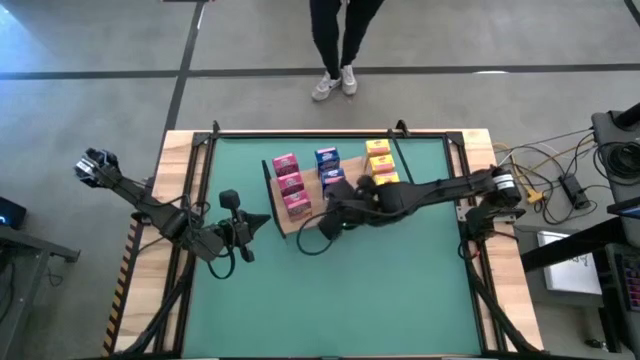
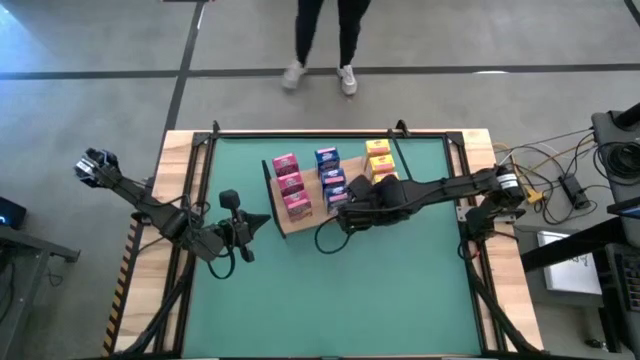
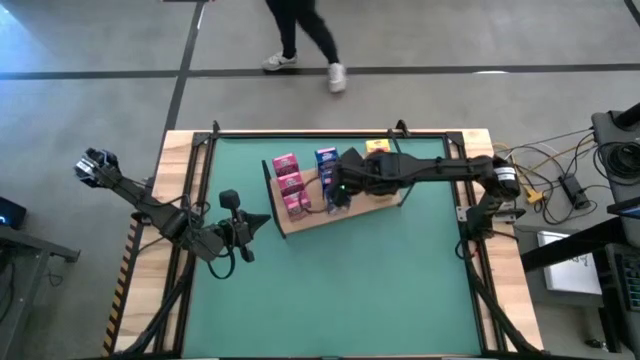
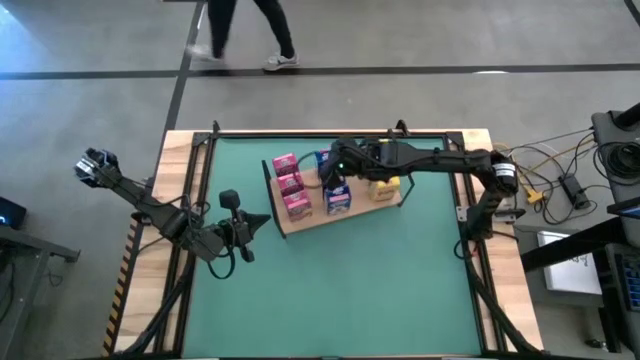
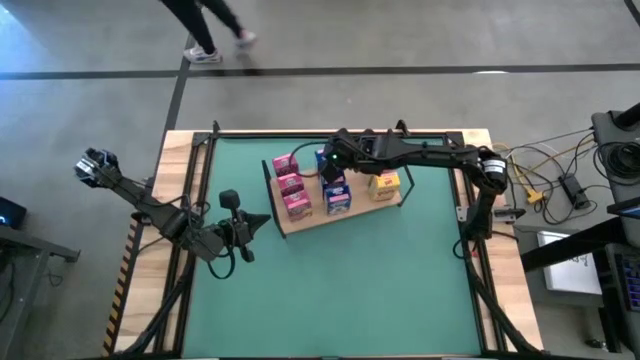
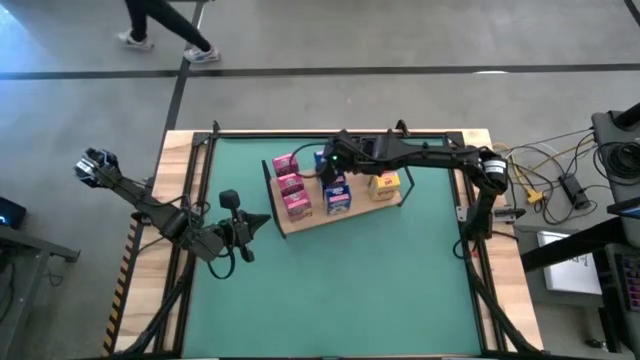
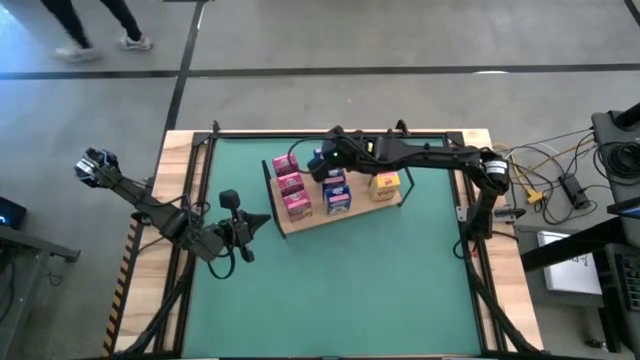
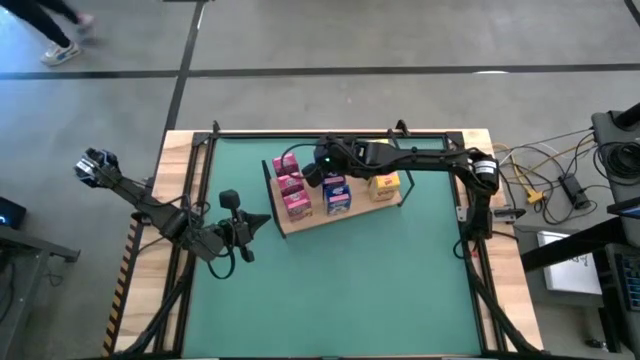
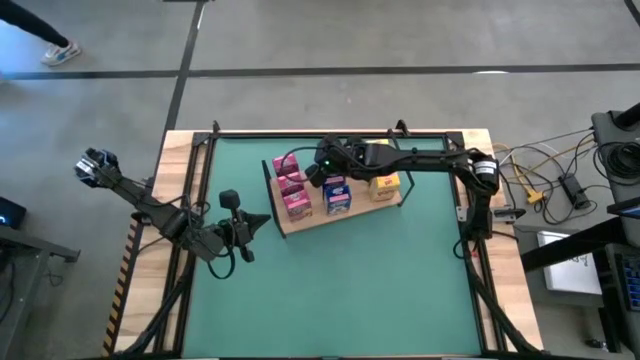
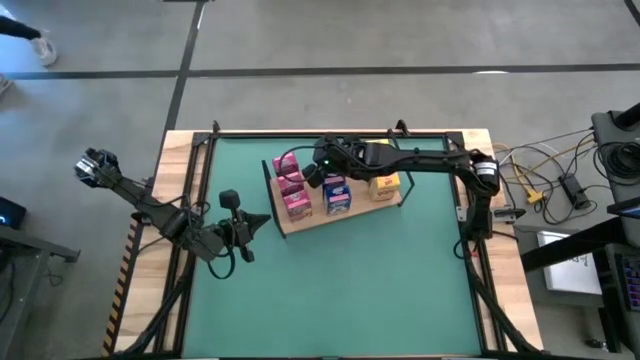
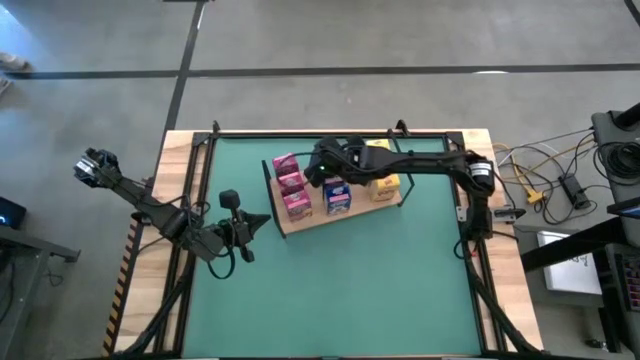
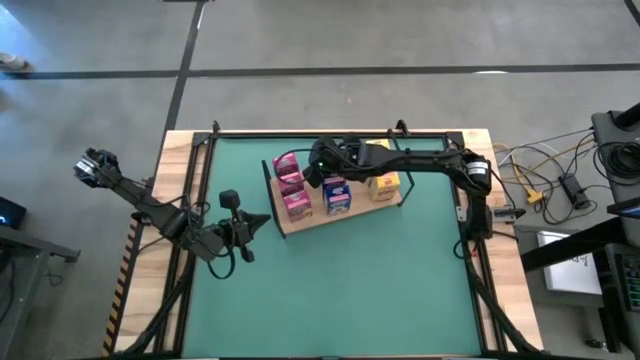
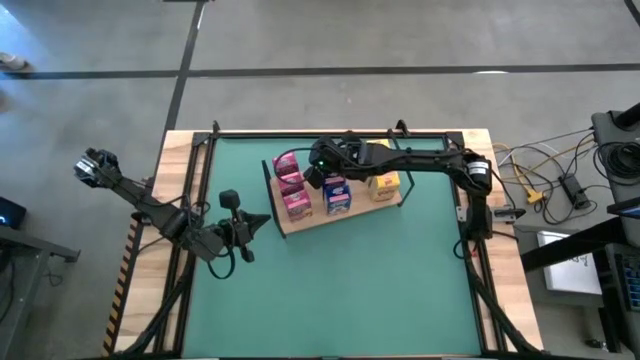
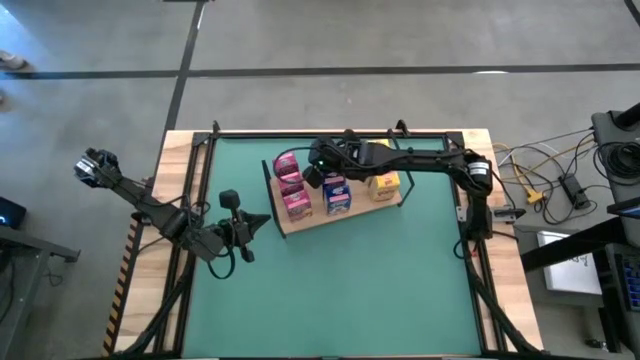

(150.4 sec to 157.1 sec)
Task: Stack cereal on shelf
Adjust the blue cereal box on the shelf

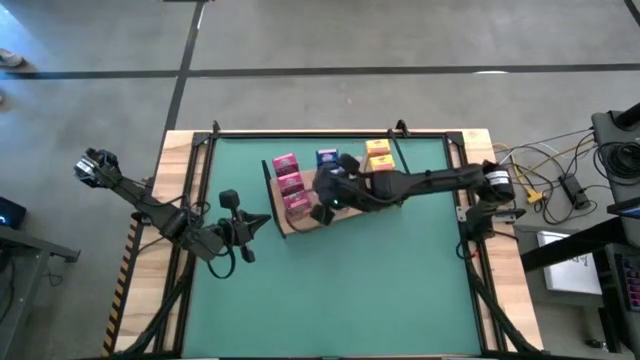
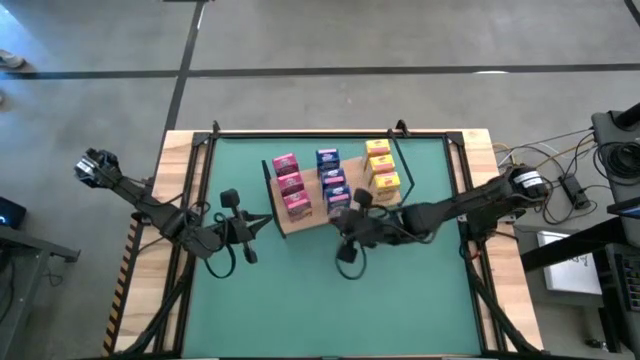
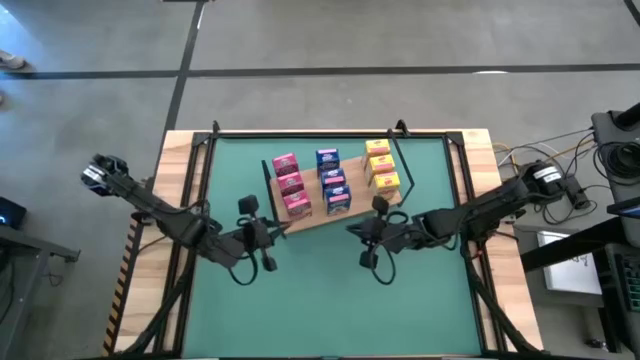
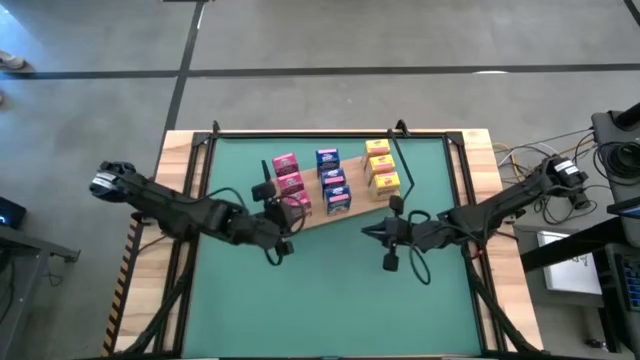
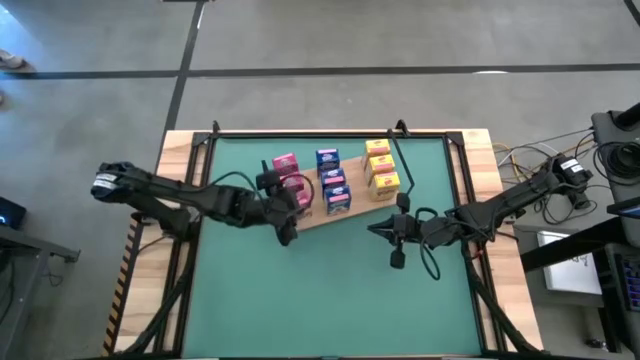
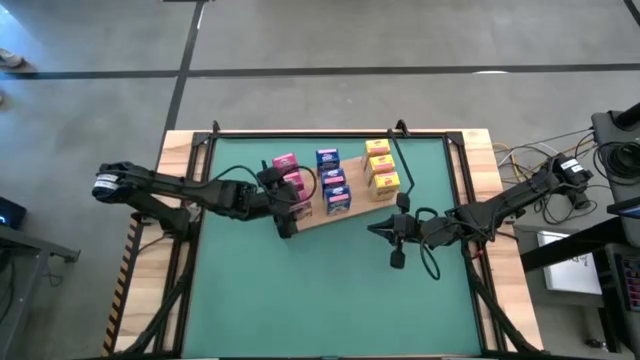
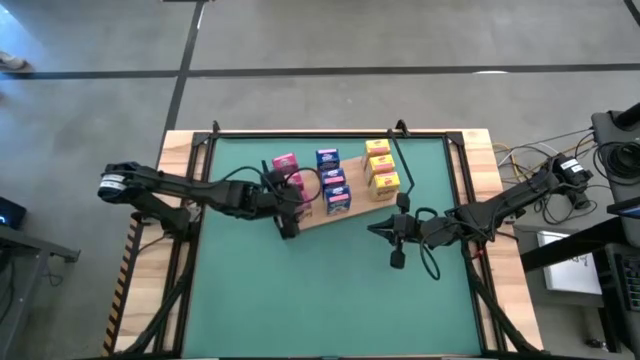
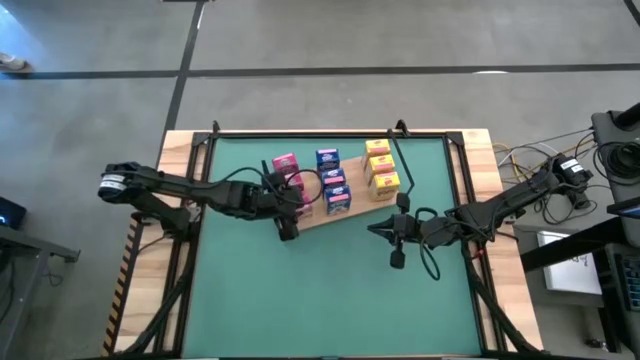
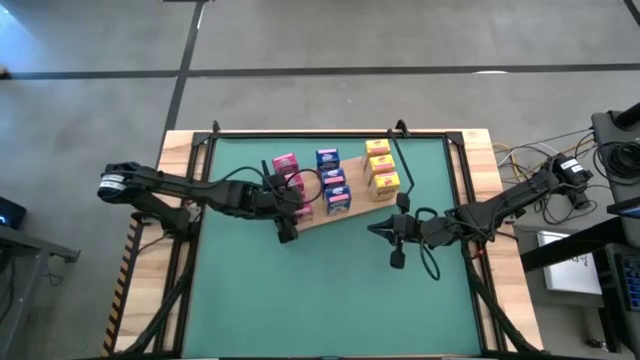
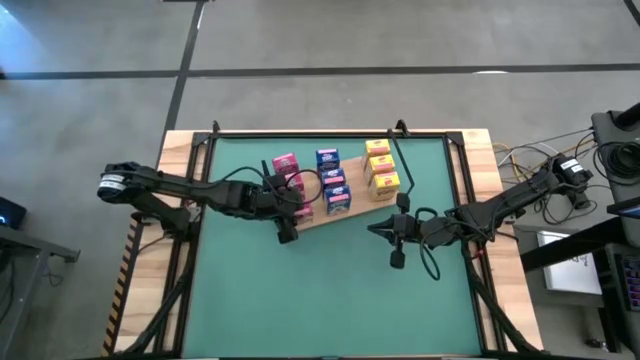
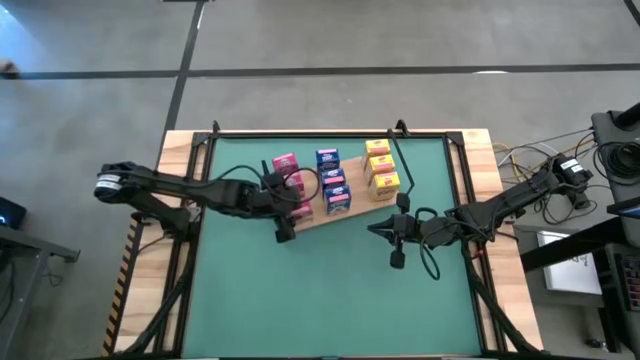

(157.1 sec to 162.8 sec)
Adjust the pink cereal box on the shelf

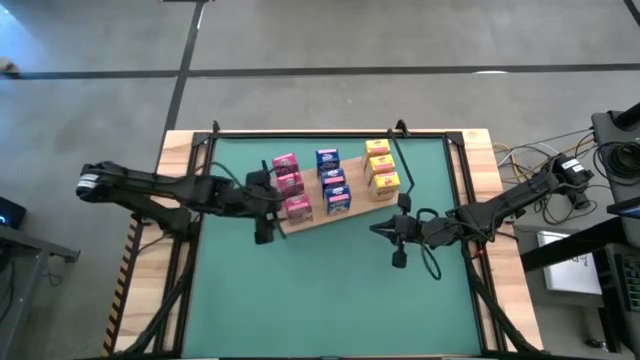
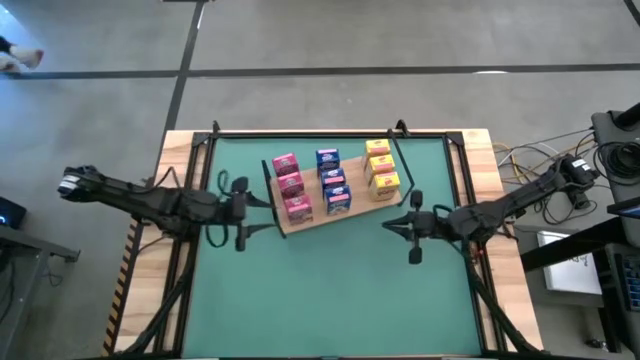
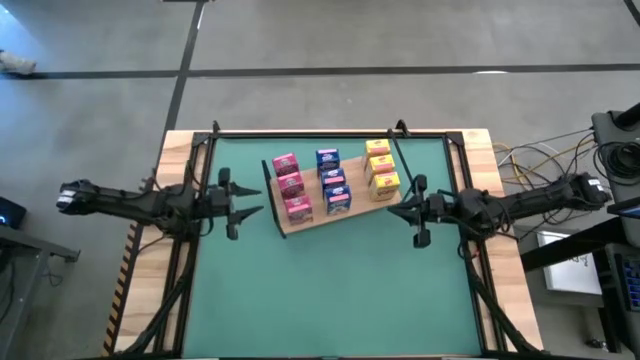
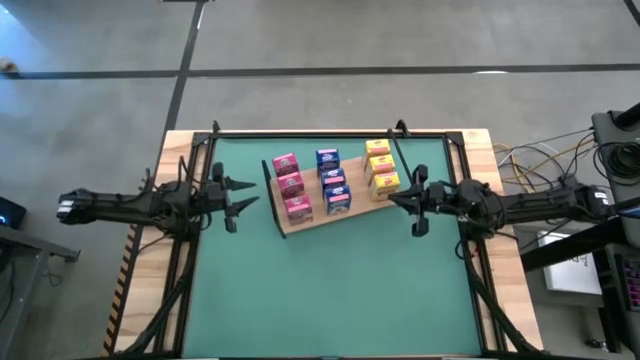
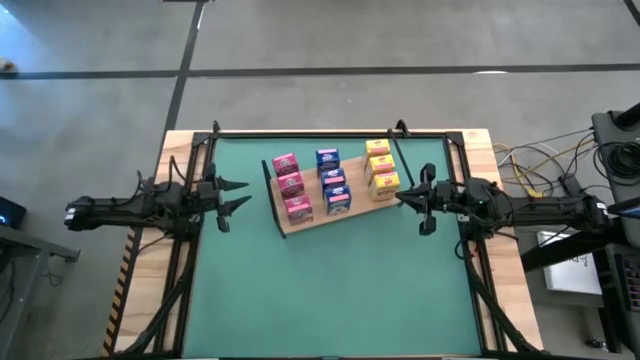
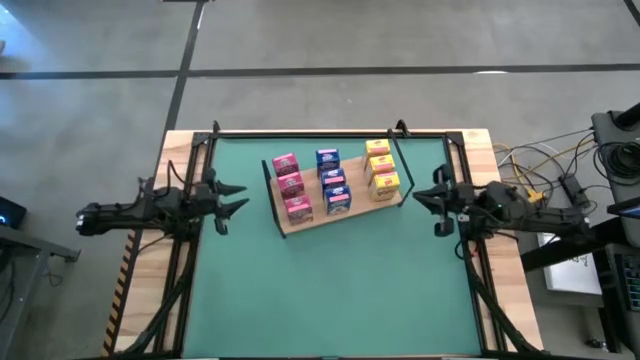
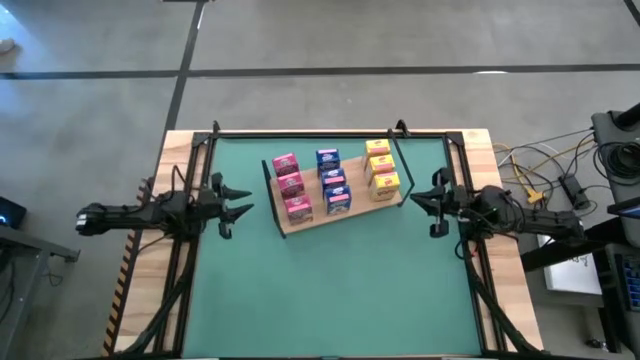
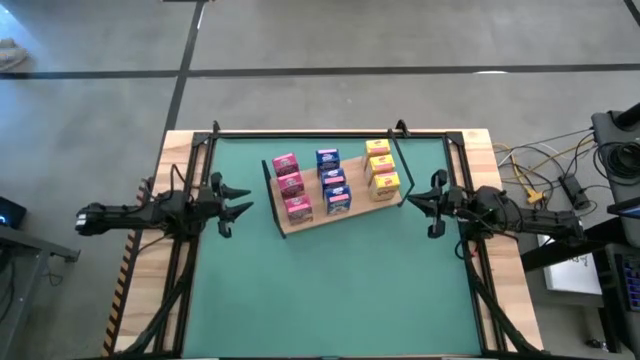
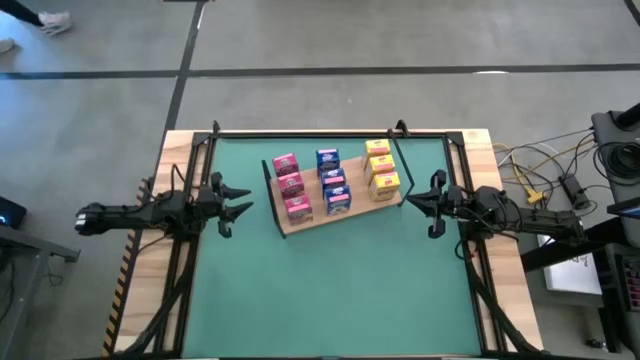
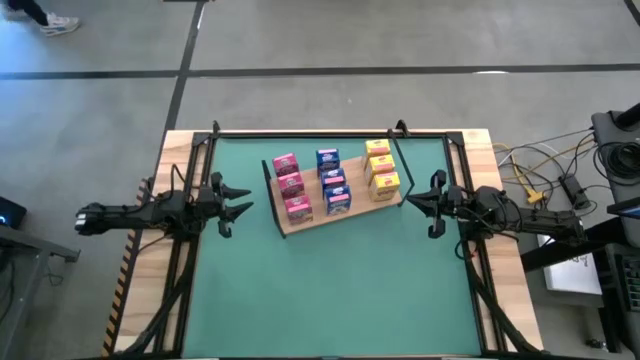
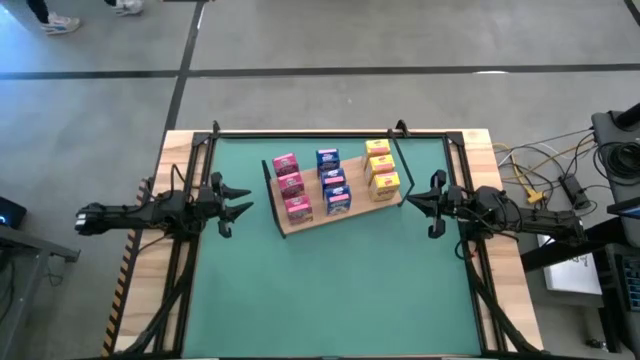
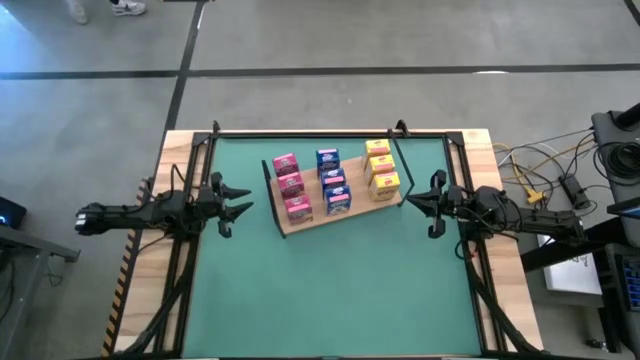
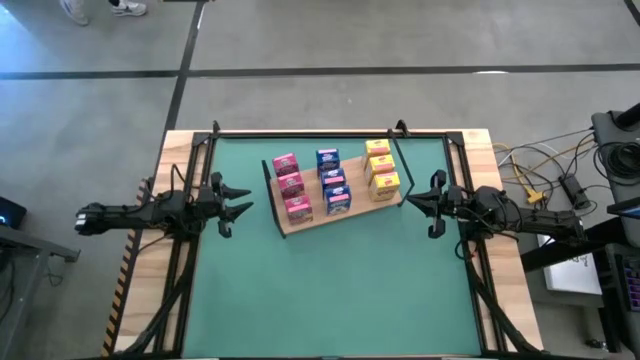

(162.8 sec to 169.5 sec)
Return to Home Position

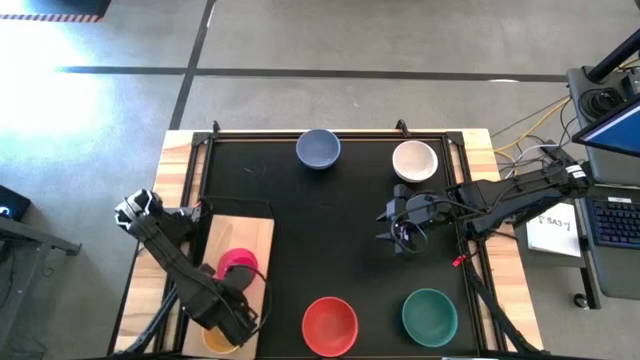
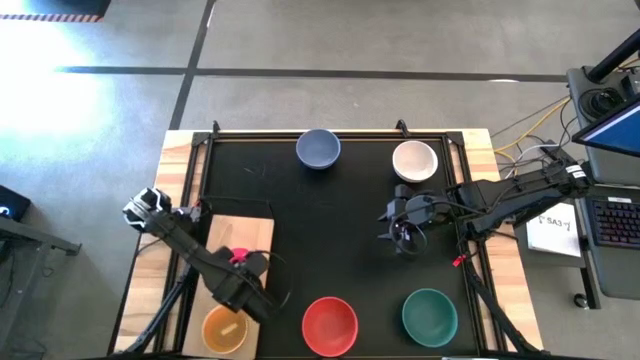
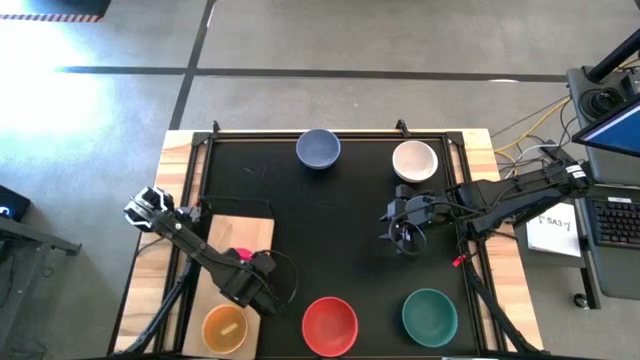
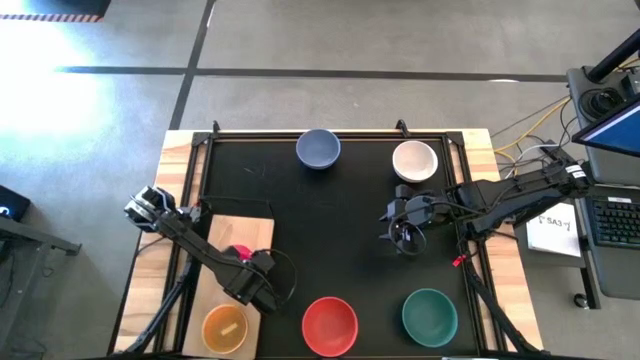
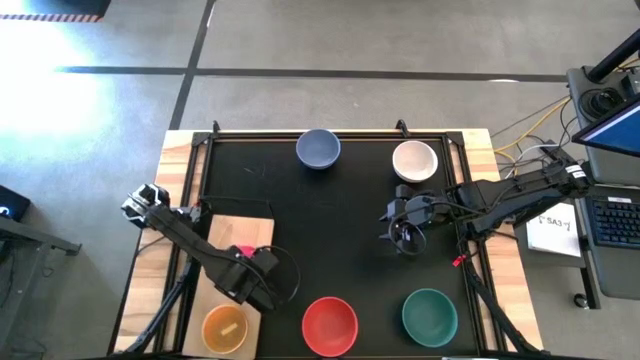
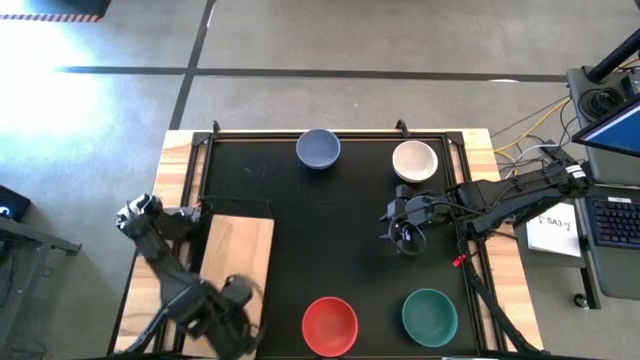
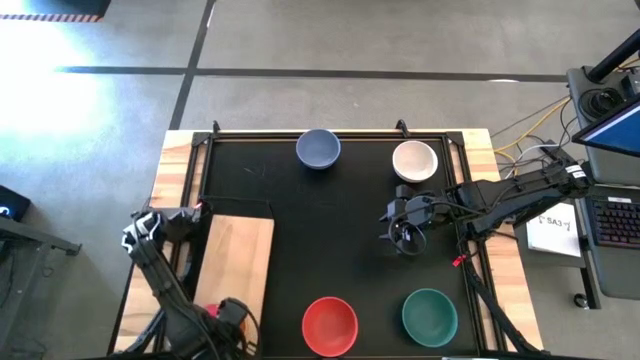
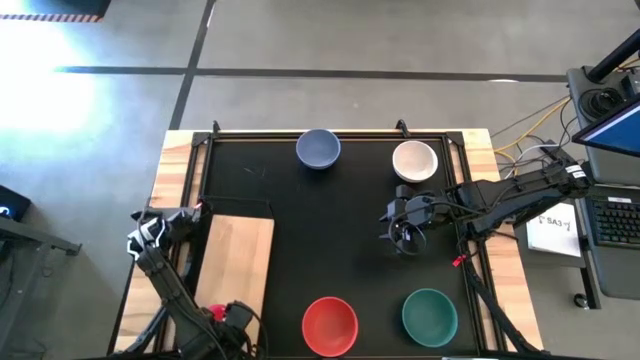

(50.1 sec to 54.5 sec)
Task: Place and stack bowls onto a shelf
Stack the pink bowl on the yellow bowl on the shelf
